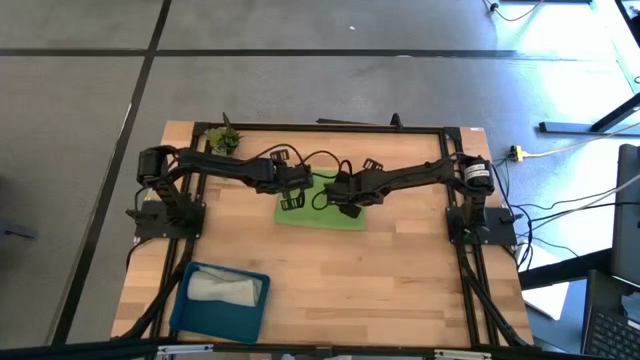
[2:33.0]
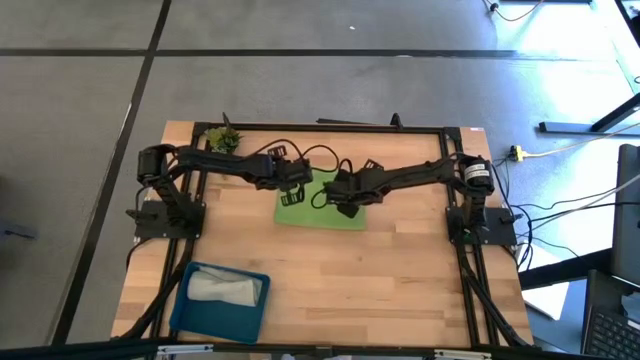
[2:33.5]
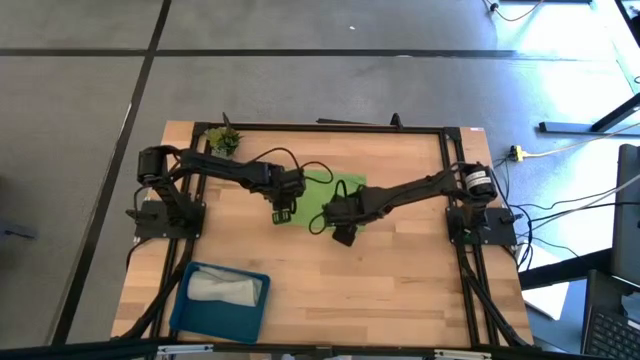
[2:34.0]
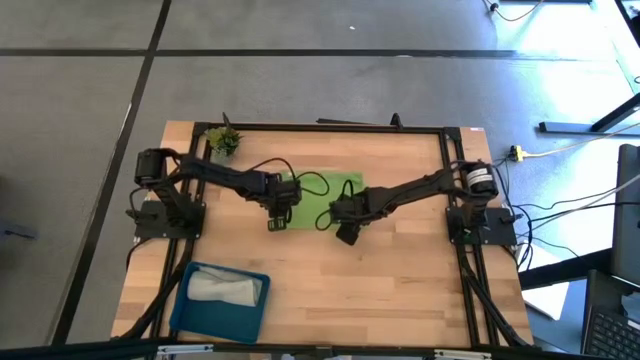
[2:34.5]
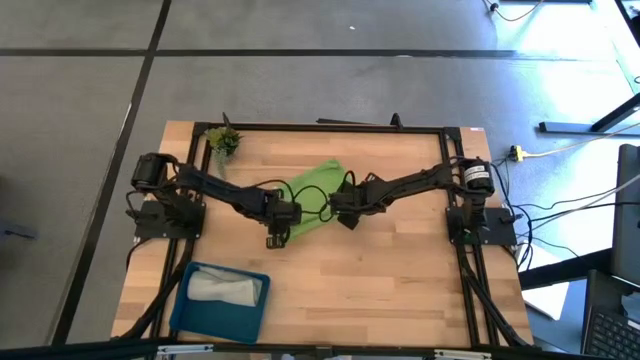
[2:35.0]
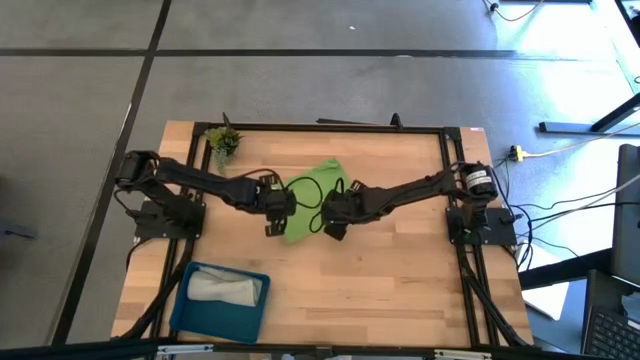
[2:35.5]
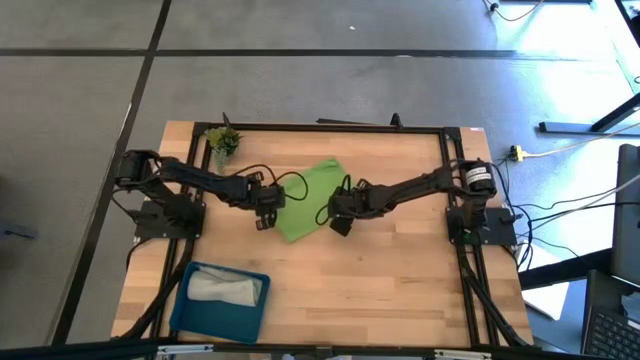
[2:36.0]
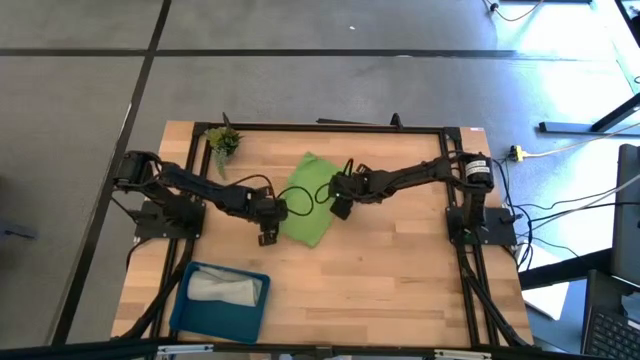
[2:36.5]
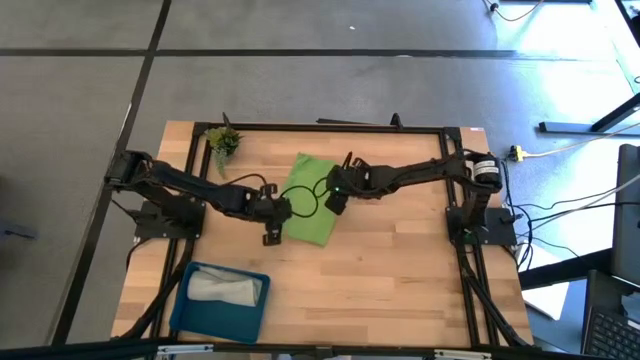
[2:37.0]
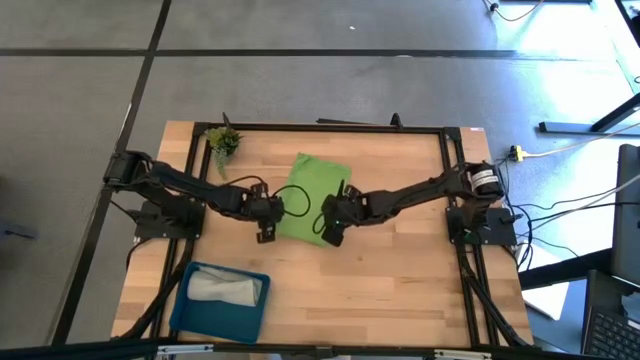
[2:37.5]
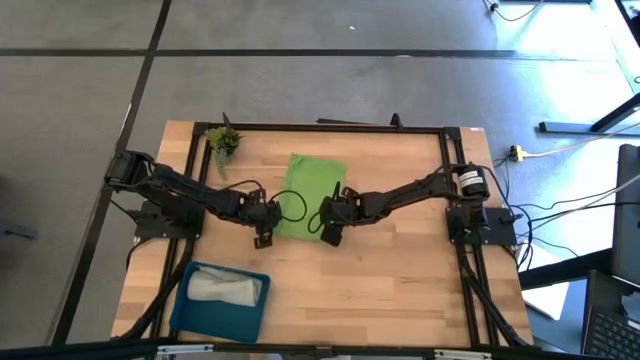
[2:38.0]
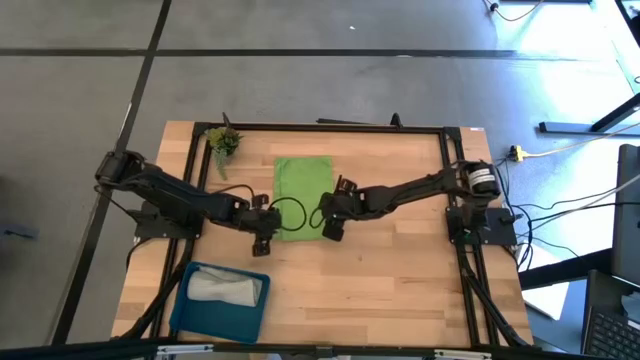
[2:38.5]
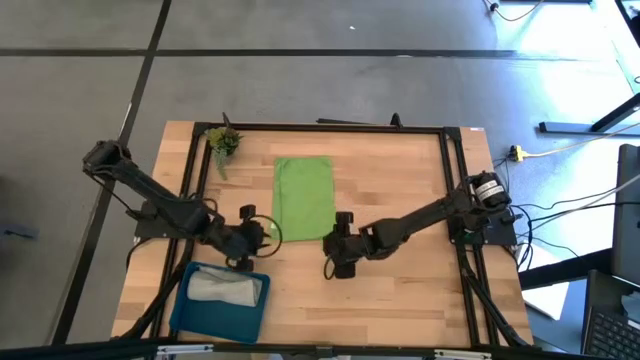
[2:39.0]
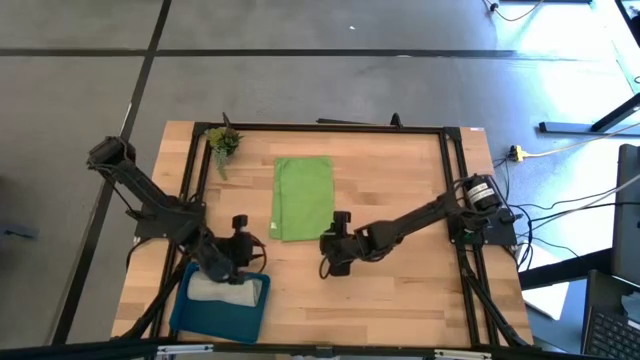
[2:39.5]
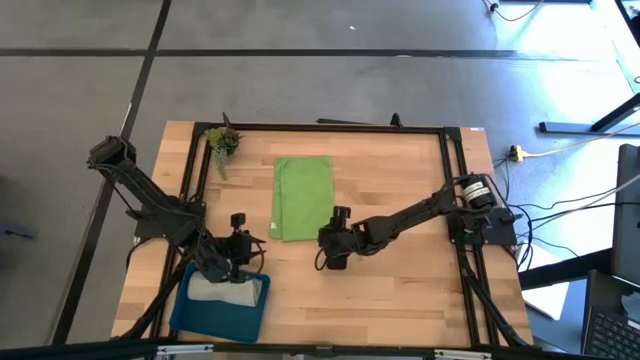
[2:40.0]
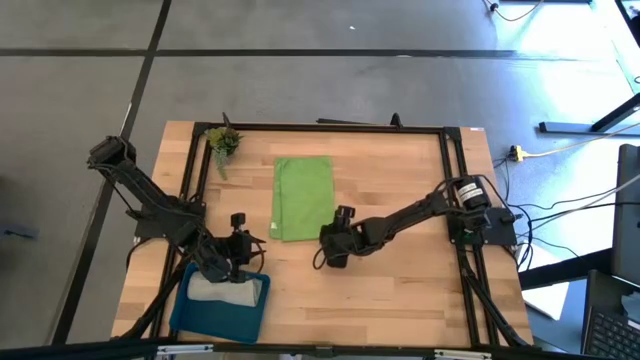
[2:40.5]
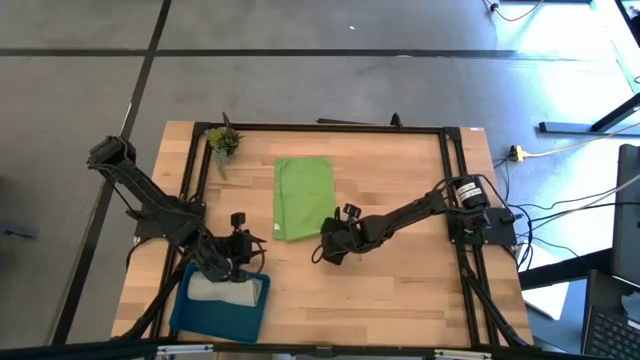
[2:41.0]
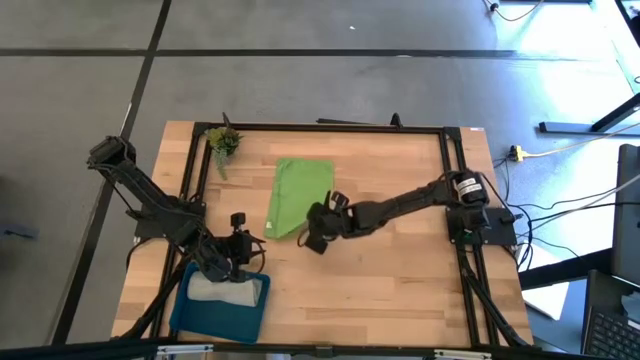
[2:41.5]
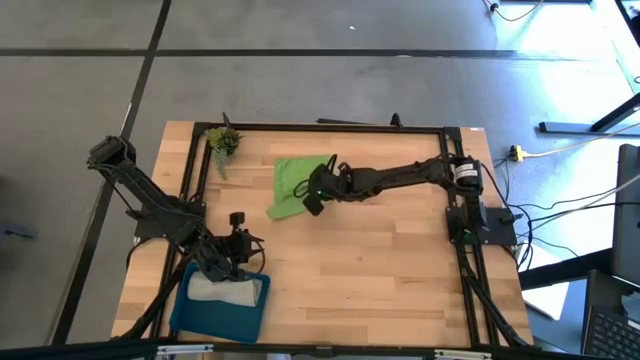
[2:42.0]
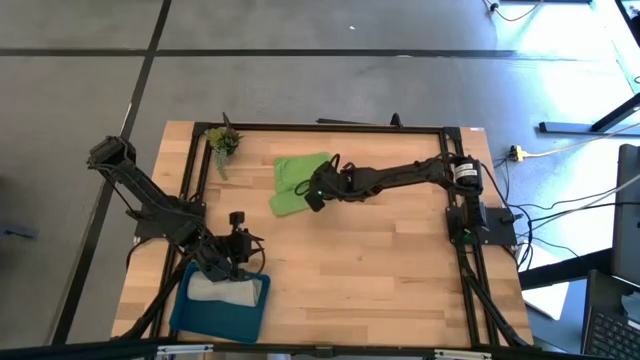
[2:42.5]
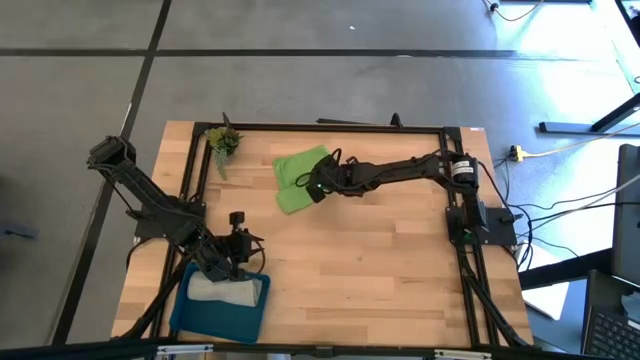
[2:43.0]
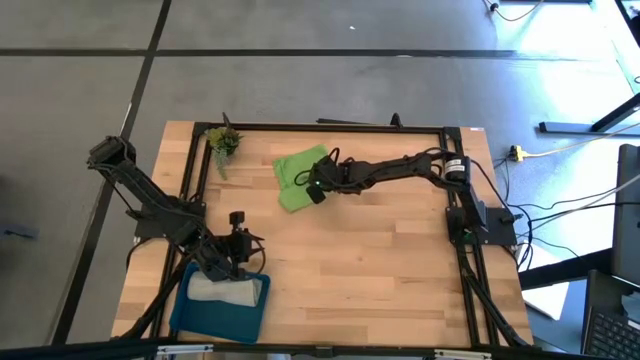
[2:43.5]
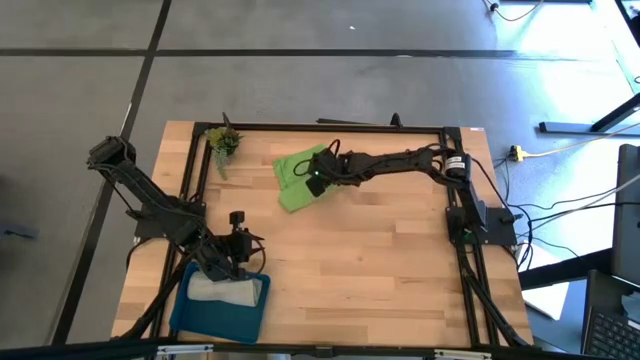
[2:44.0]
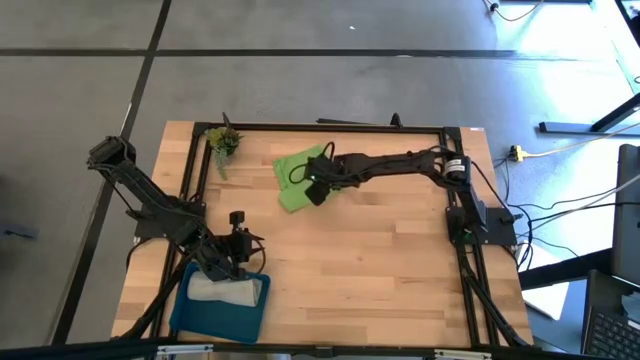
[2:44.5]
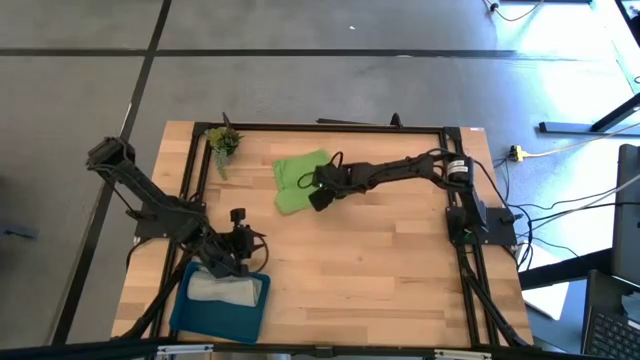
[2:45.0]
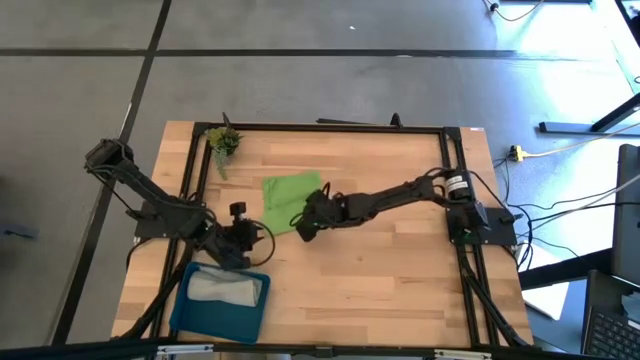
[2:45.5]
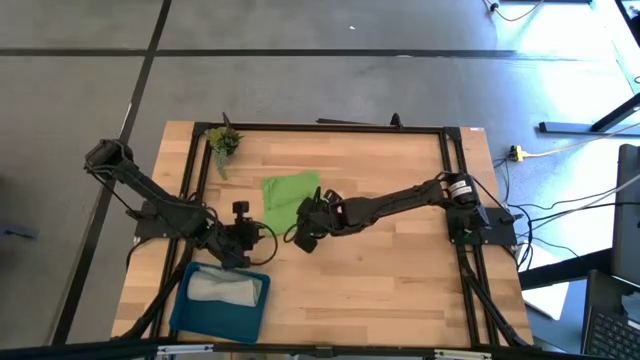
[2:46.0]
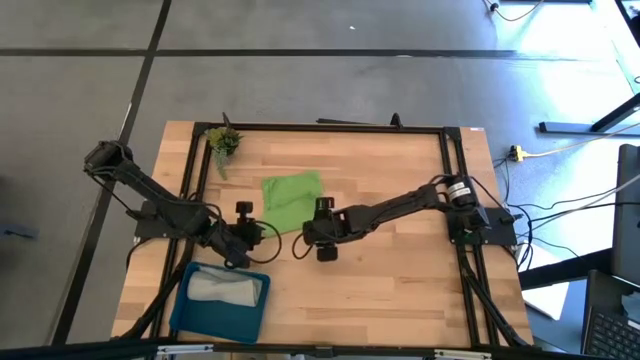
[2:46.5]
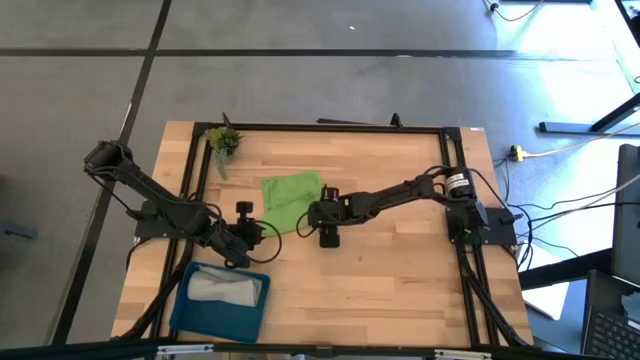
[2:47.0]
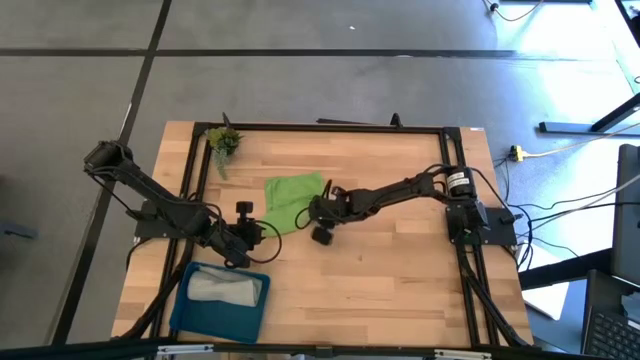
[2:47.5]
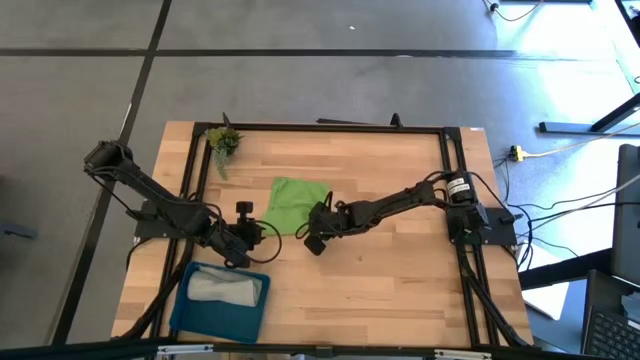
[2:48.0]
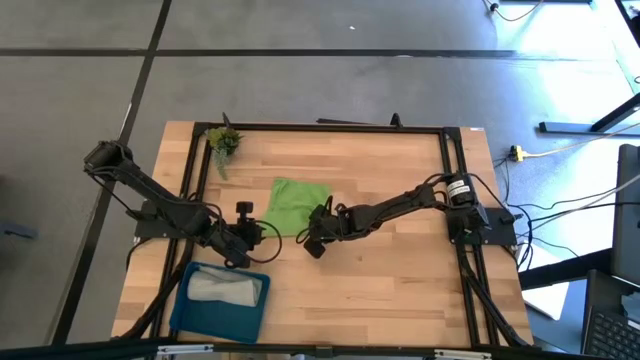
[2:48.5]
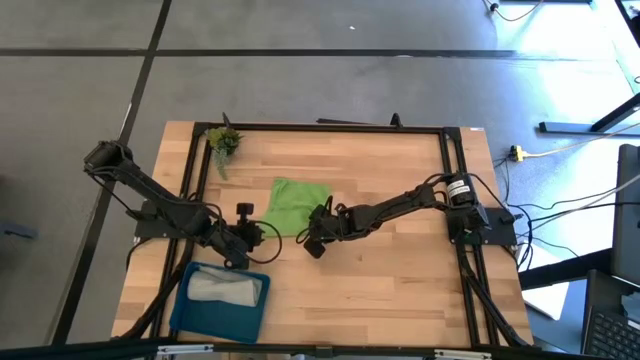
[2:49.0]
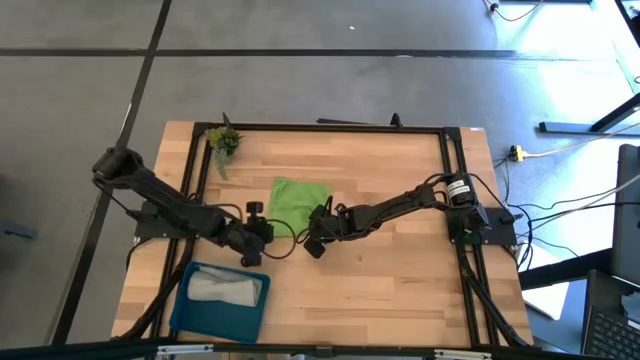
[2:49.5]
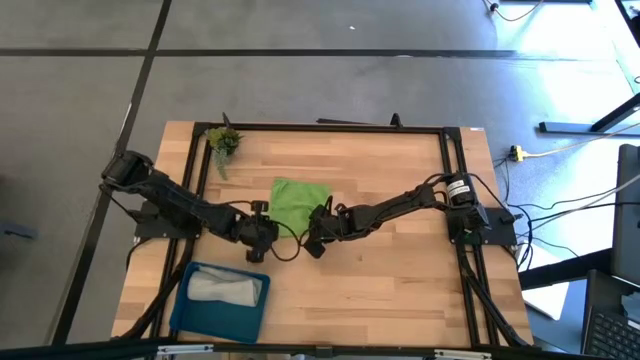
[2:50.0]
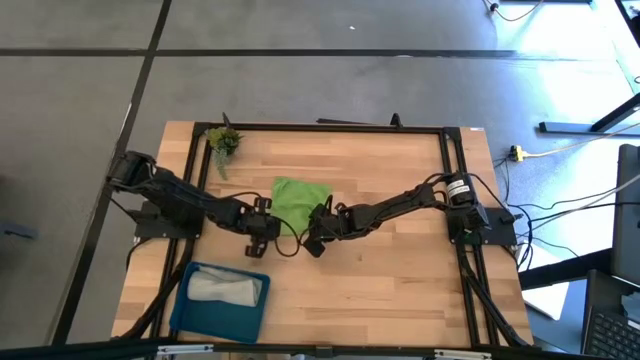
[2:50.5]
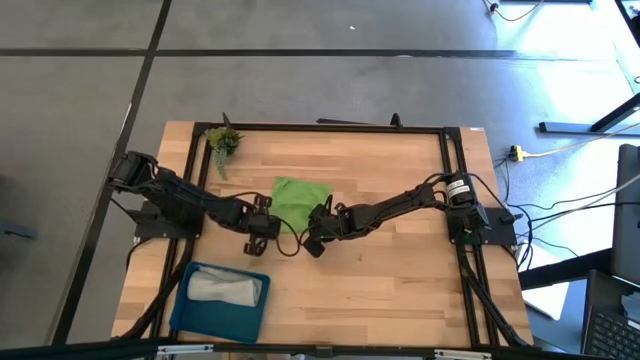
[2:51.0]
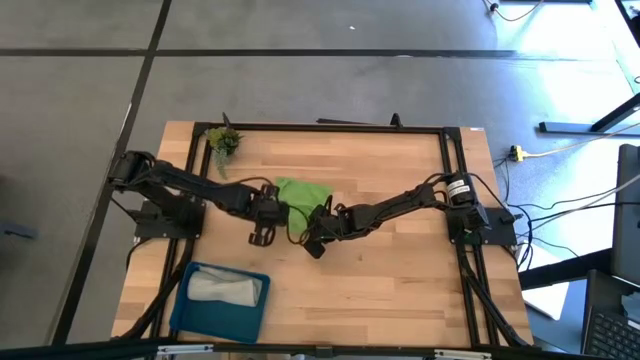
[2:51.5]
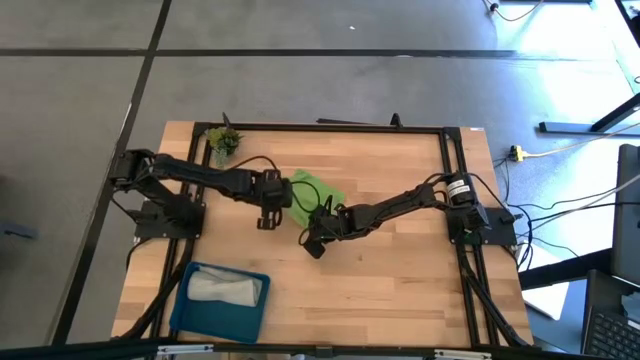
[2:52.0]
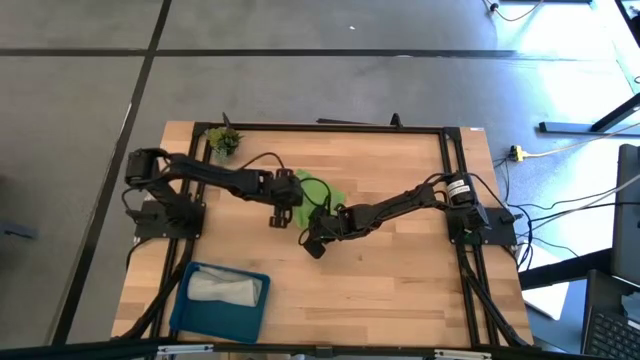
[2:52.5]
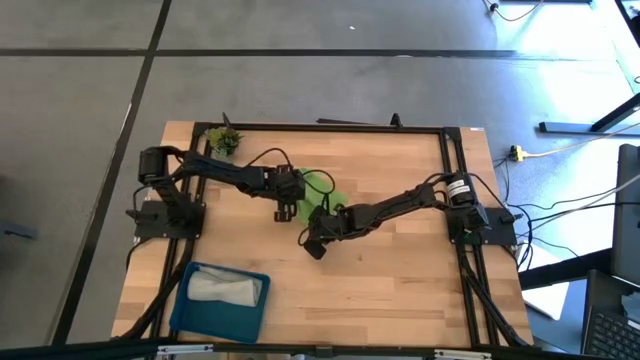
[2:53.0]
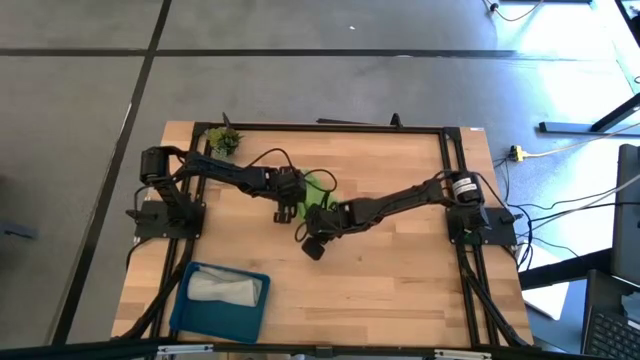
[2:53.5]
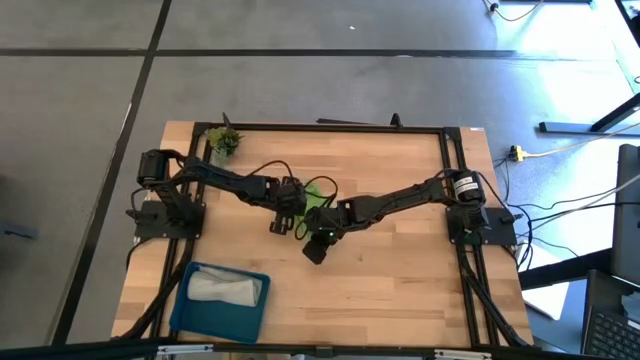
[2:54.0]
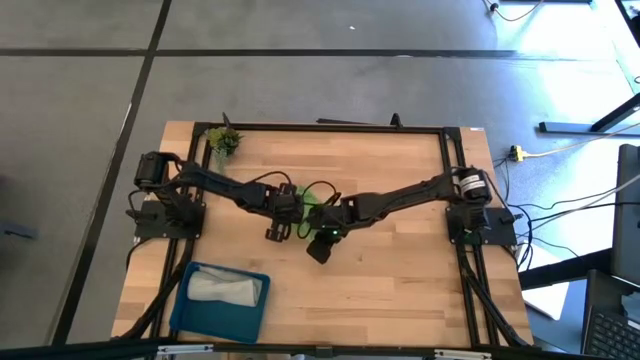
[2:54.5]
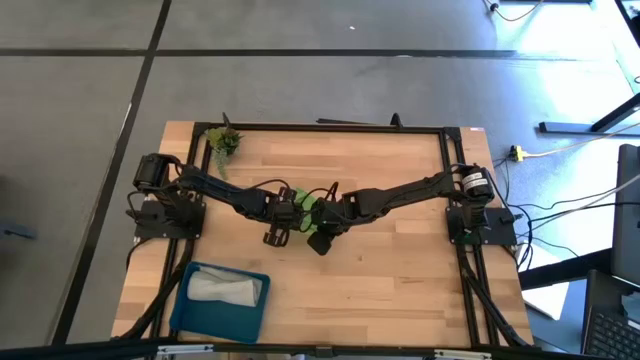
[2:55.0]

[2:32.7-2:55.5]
Task: Fold microfiber towels
Fold the green microfiber cloth
